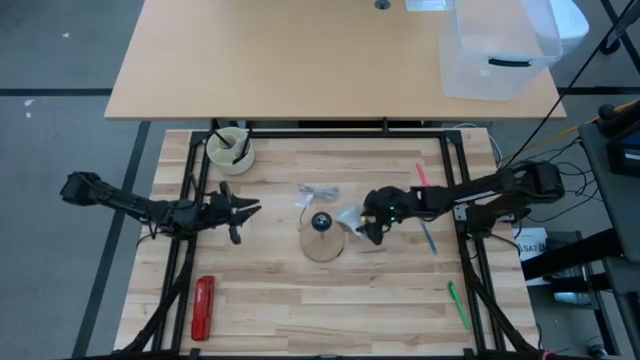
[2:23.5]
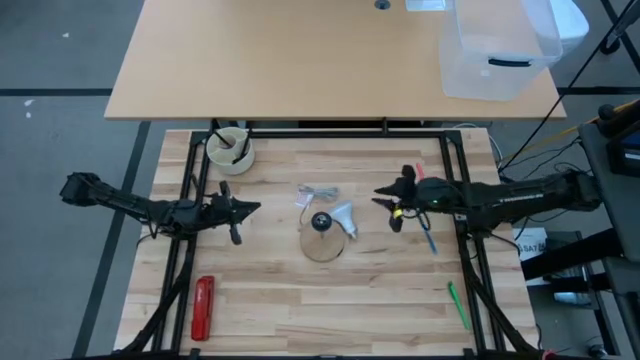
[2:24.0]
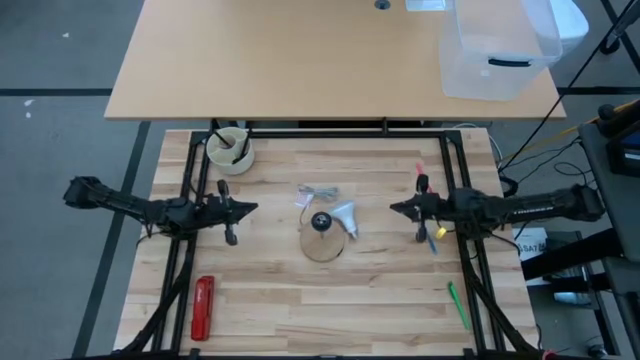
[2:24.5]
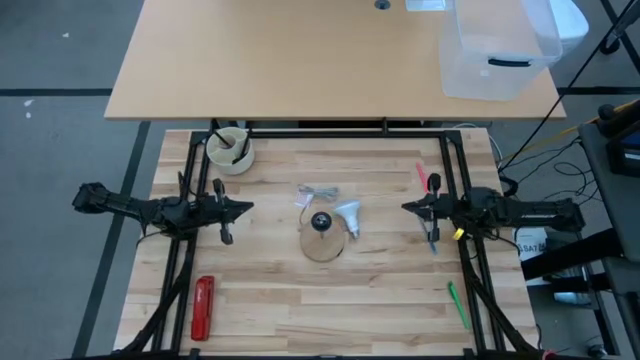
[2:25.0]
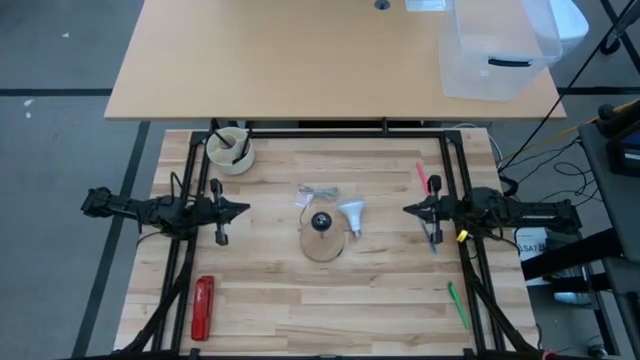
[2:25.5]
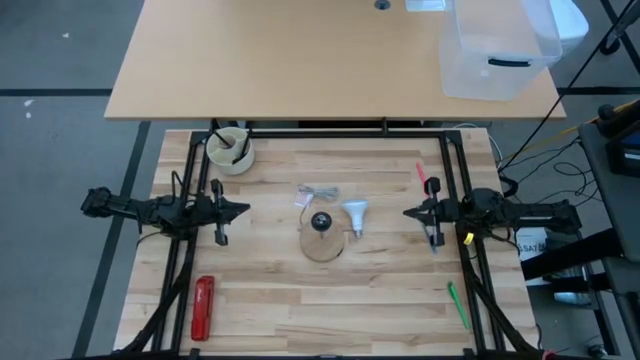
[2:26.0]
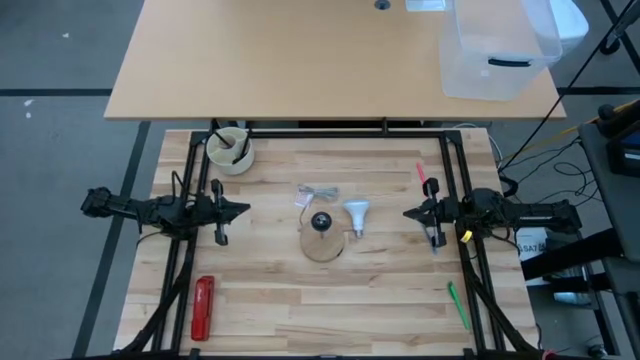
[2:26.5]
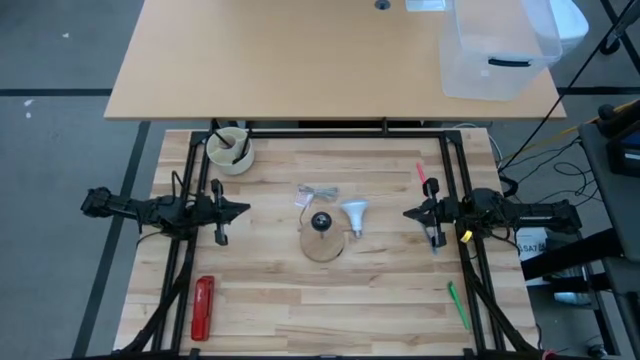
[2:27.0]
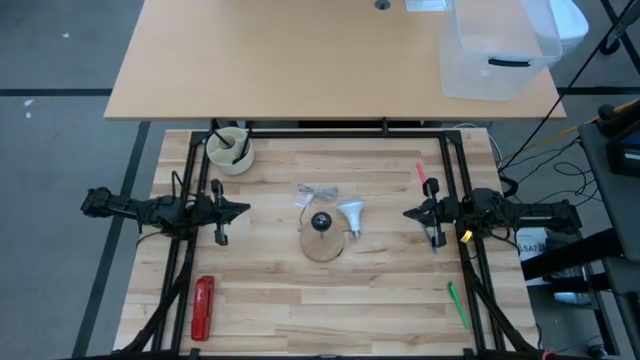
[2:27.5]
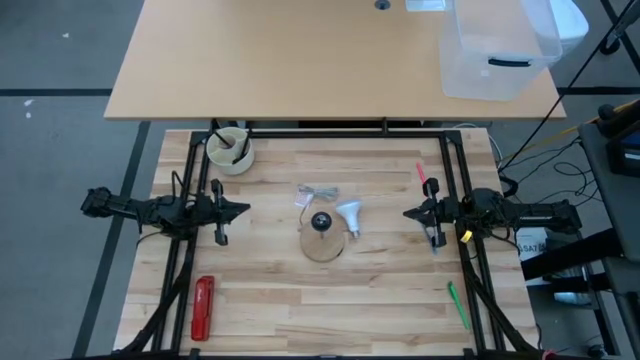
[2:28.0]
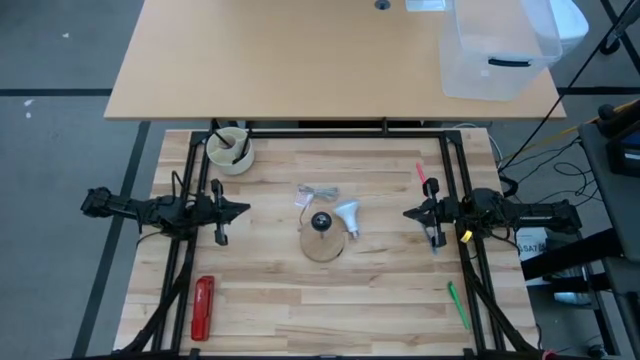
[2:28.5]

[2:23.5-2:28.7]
Task: Screw lightbulb
Return to Home Position

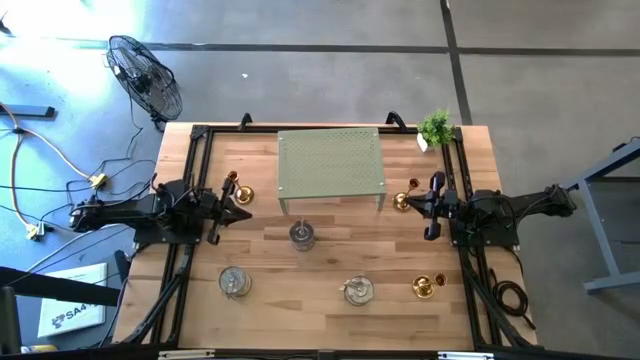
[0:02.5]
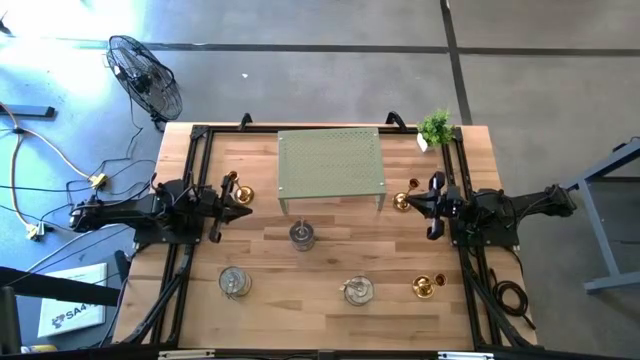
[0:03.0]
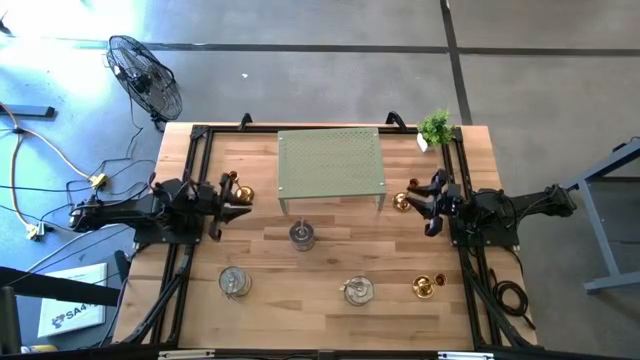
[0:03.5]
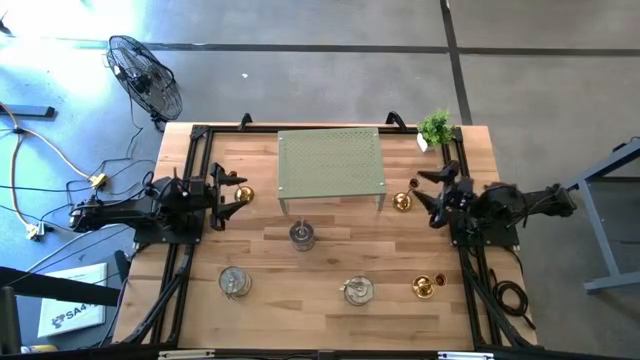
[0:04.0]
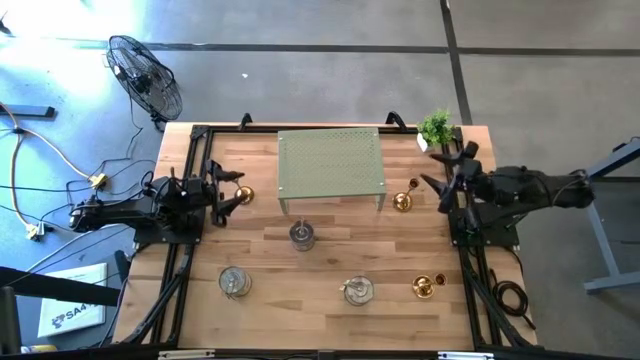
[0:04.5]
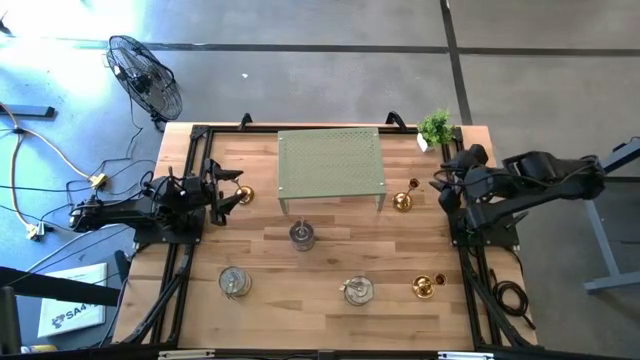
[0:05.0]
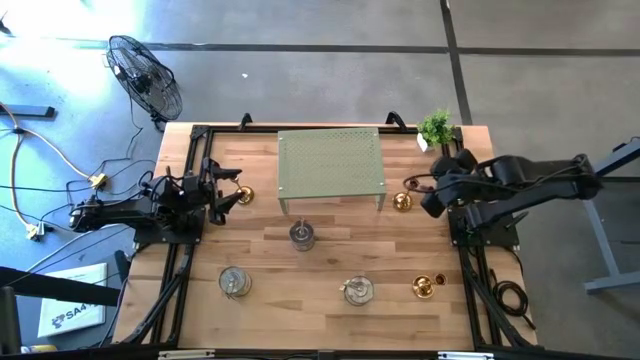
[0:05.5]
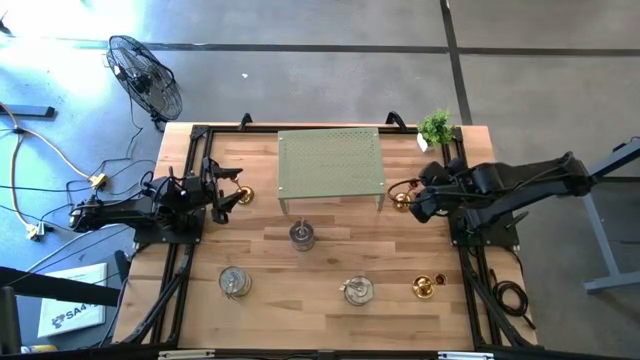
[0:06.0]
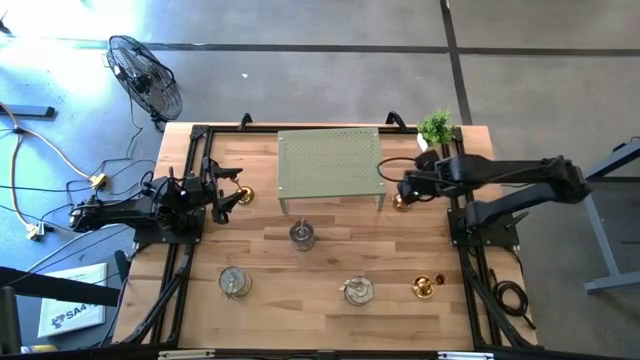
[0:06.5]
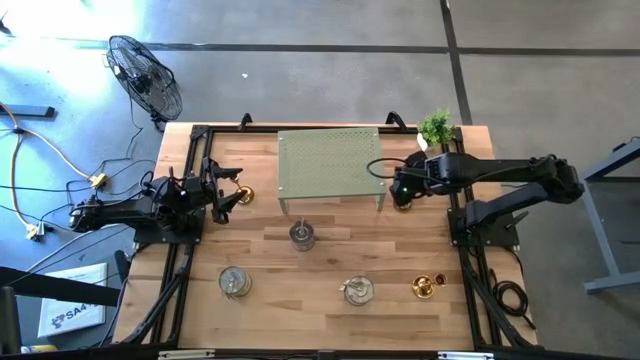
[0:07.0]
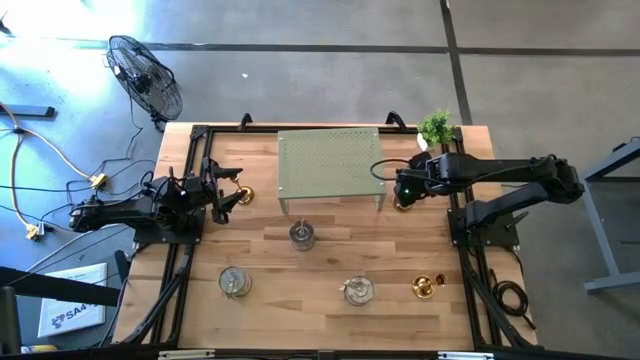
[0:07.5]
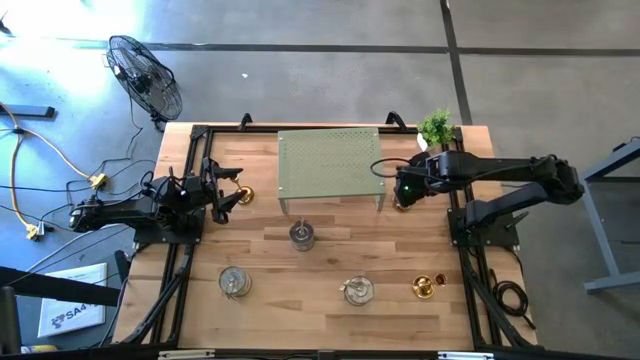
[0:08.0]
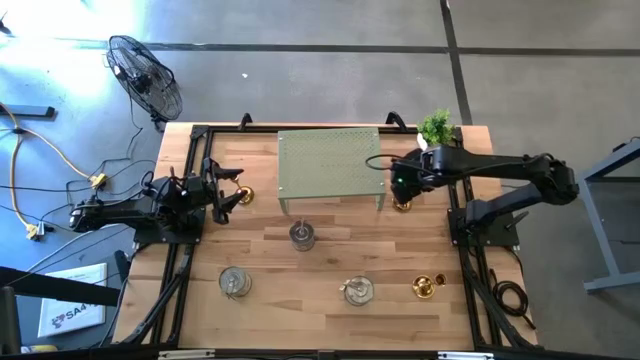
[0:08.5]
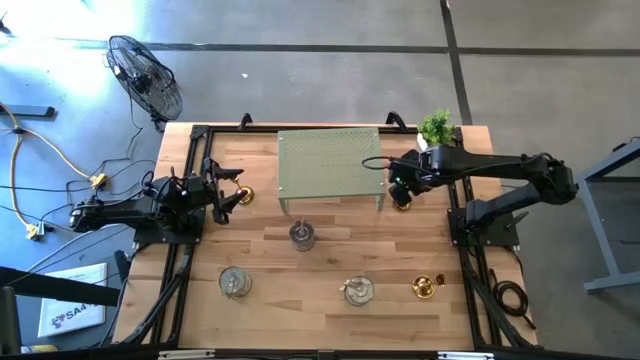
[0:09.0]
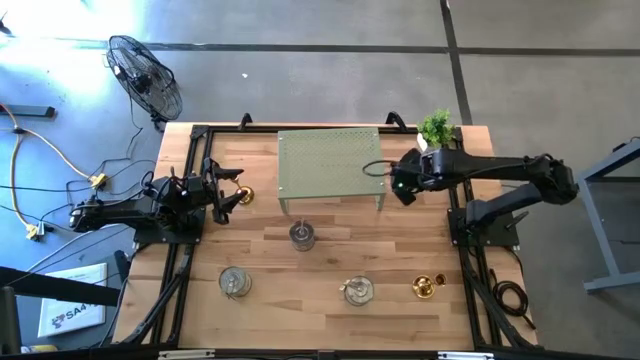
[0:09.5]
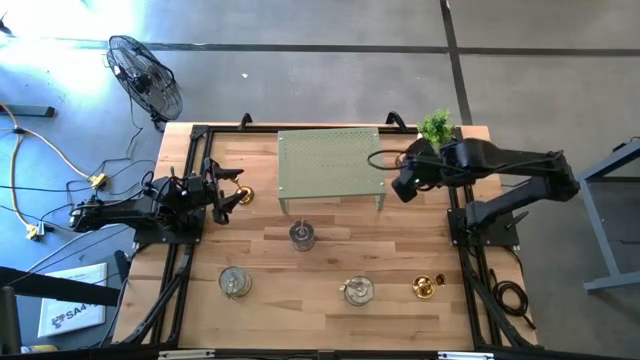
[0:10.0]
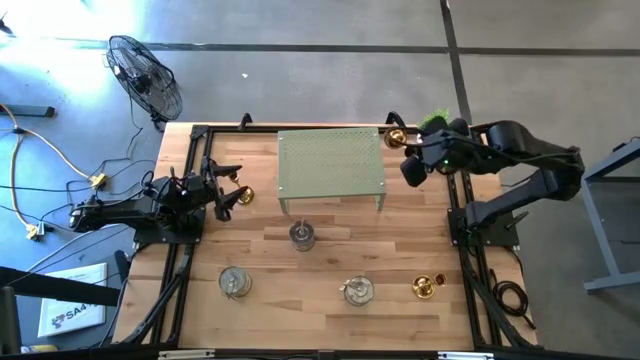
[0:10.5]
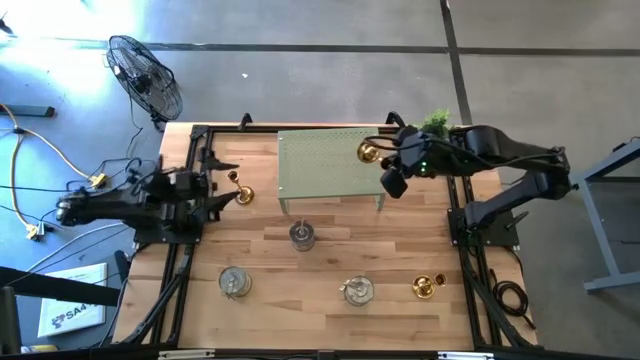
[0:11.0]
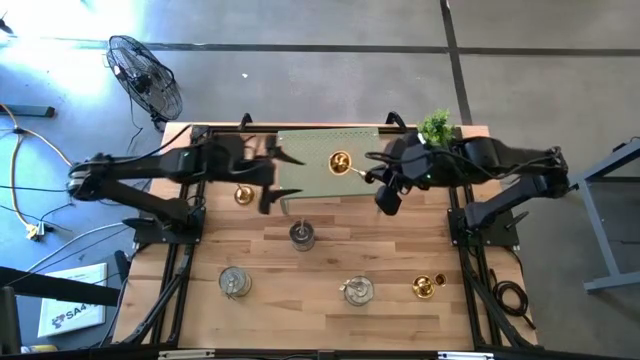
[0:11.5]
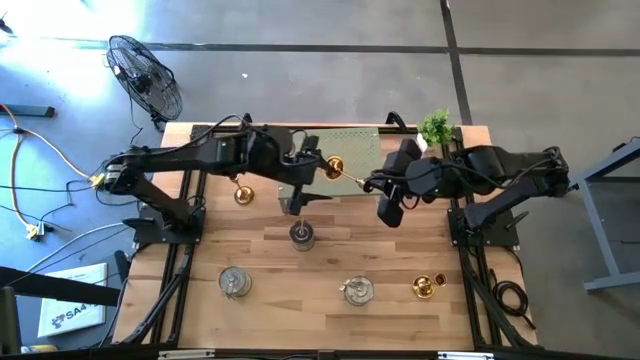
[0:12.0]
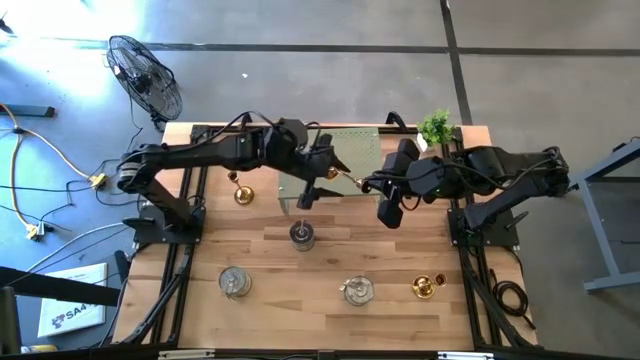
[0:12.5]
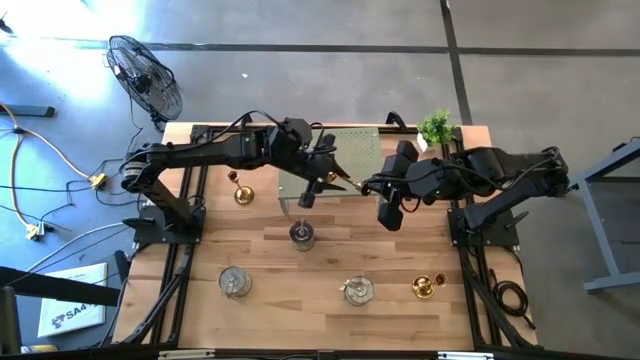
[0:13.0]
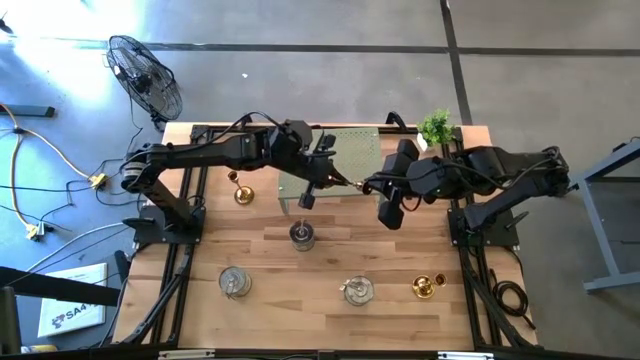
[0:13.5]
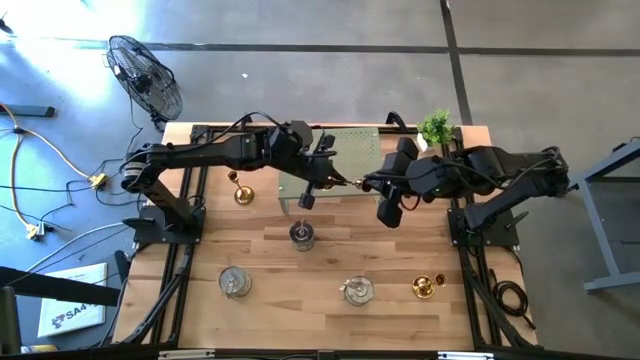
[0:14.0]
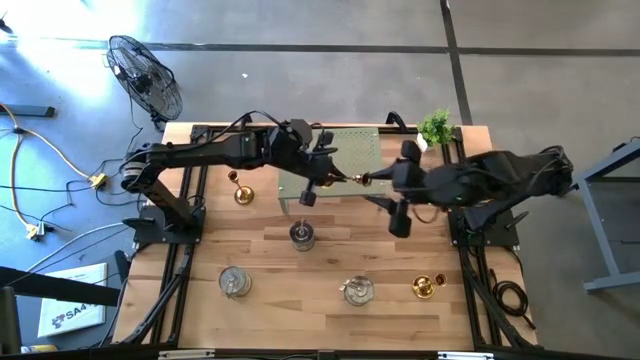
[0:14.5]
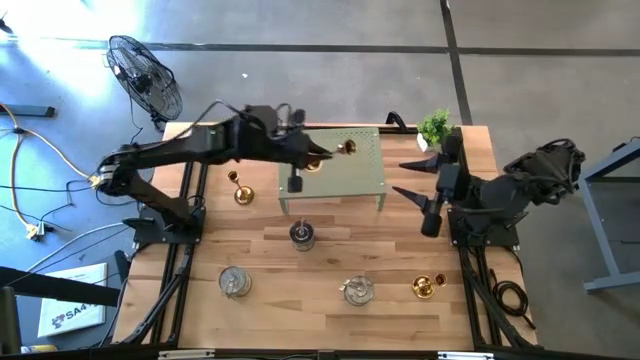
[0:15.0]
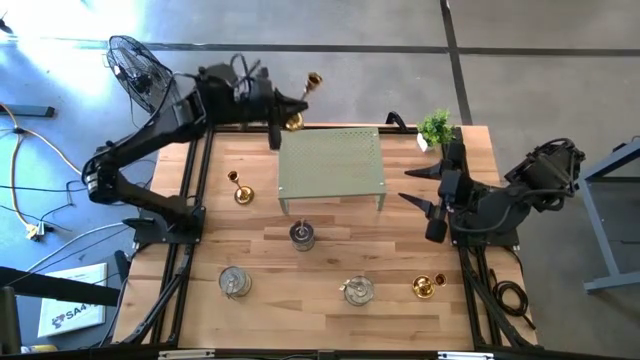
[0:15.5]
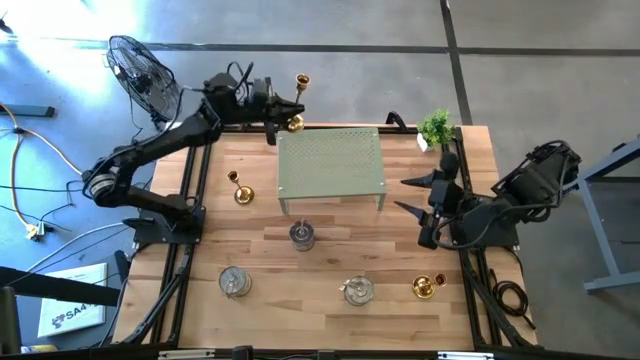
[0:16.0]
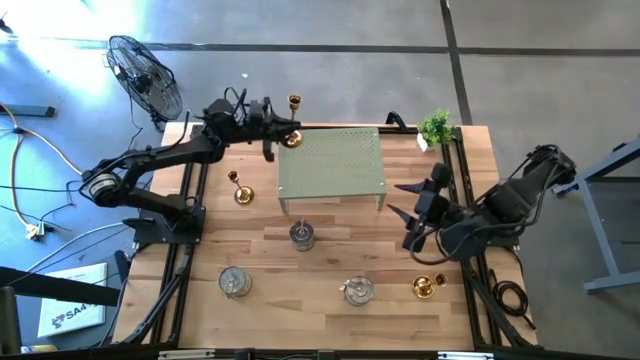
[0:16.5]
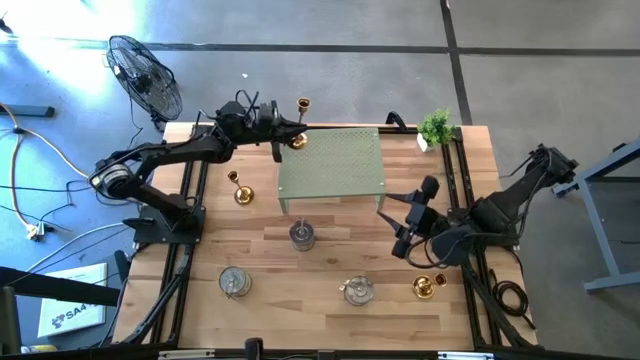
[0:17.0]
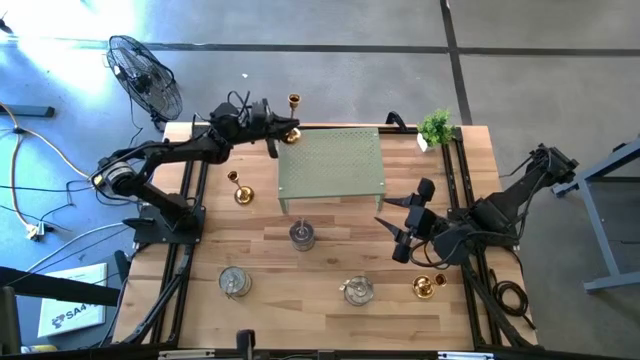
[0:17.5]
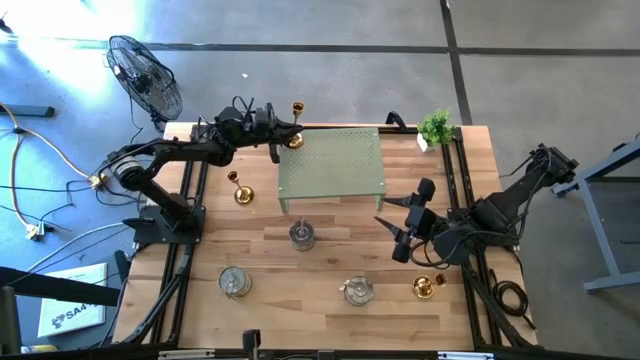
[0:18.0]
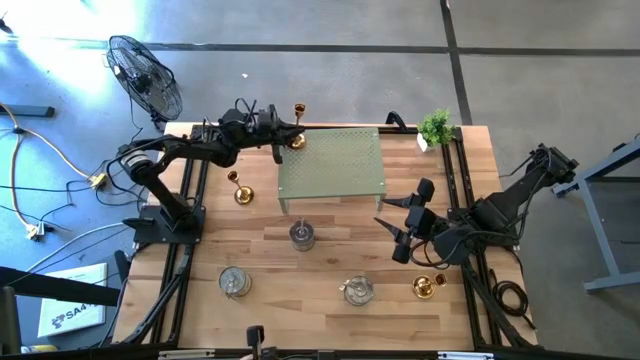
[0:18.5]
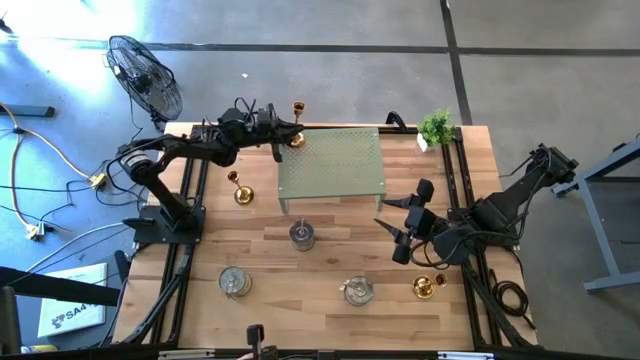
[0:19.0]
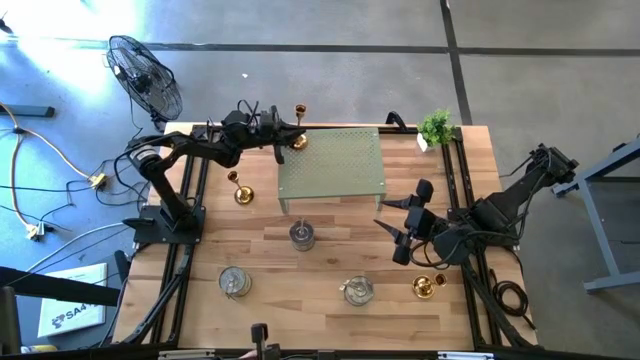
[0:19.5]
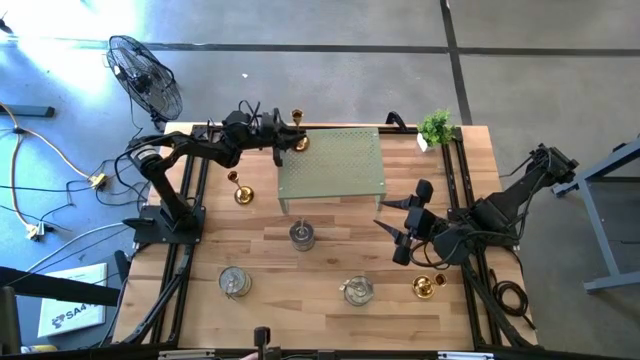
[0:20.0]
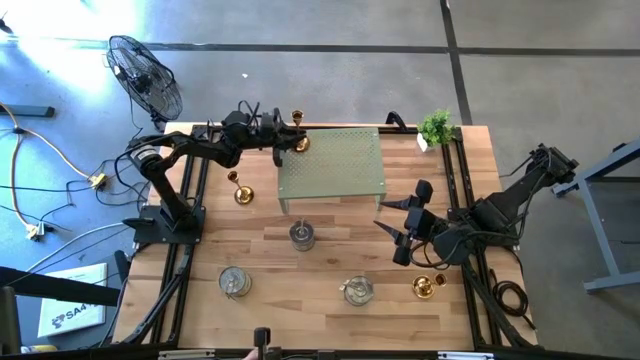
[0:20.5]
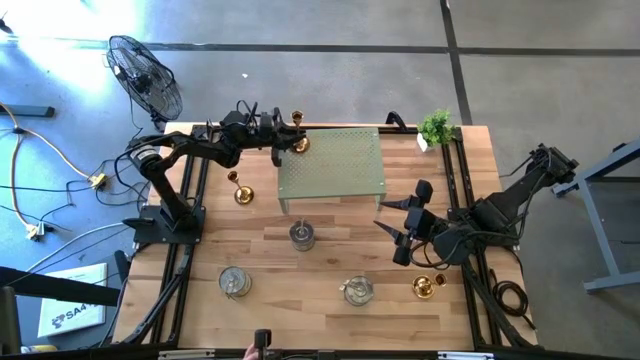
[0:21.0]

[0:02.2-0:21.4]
Task: Pick & Place candle stick holders
Put the top right gold candle holder on the shelf
